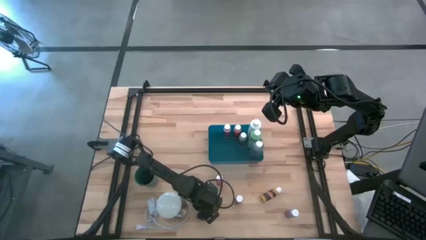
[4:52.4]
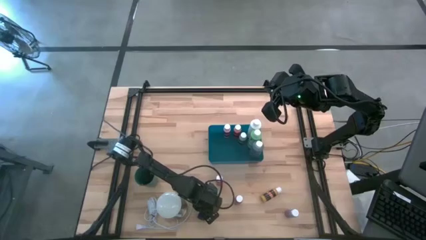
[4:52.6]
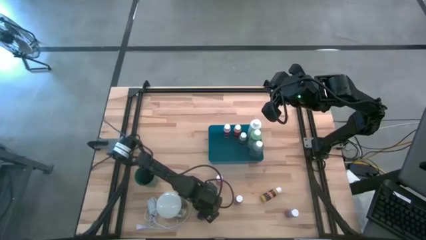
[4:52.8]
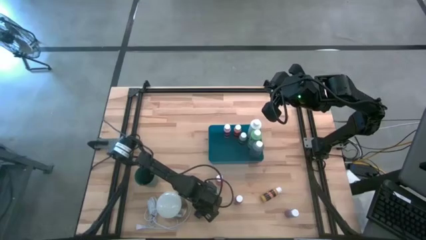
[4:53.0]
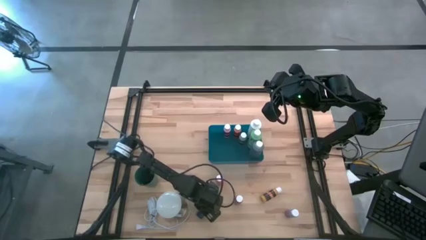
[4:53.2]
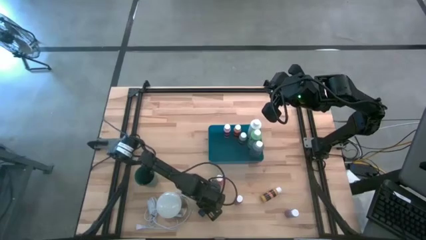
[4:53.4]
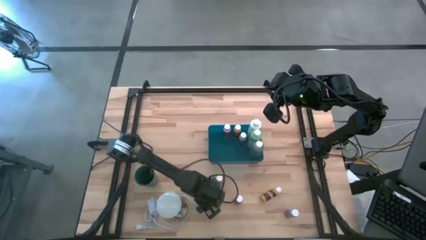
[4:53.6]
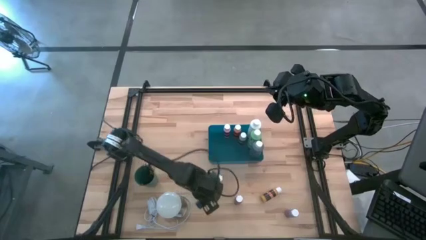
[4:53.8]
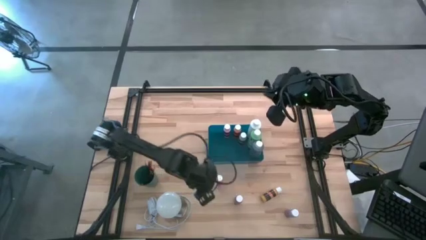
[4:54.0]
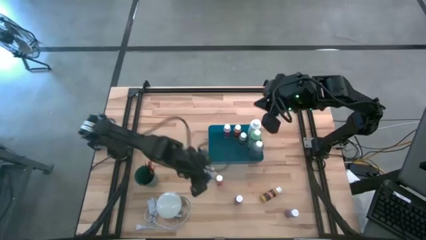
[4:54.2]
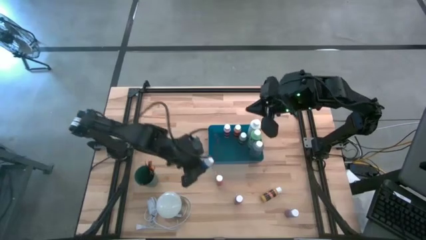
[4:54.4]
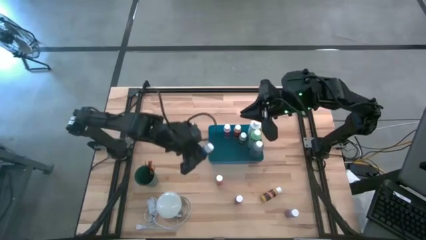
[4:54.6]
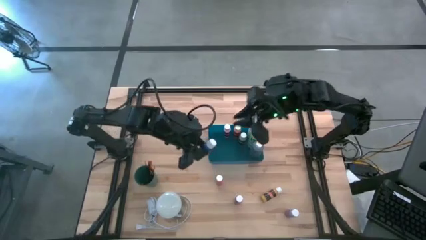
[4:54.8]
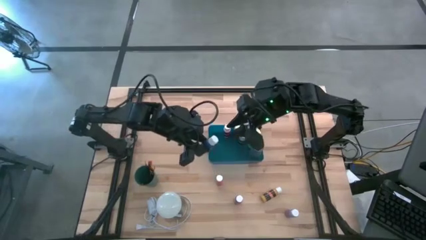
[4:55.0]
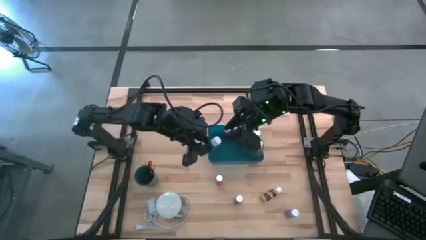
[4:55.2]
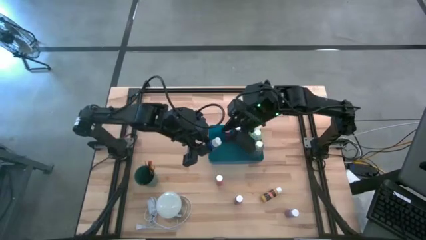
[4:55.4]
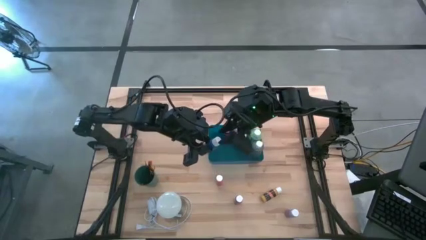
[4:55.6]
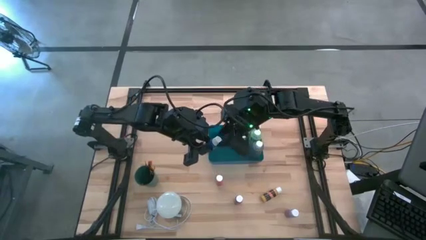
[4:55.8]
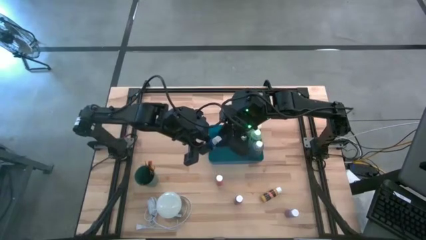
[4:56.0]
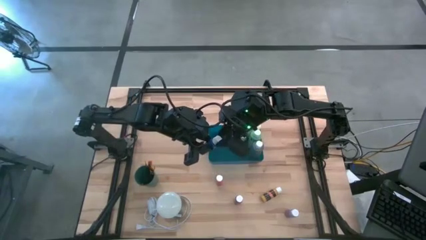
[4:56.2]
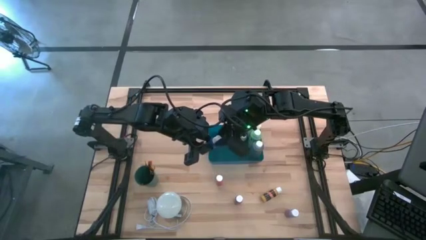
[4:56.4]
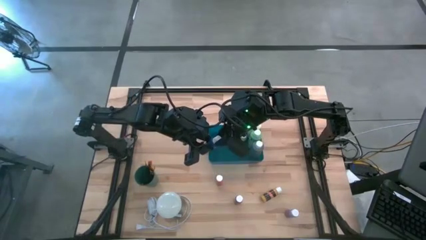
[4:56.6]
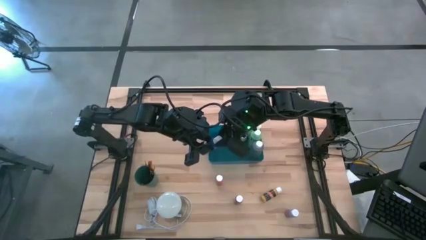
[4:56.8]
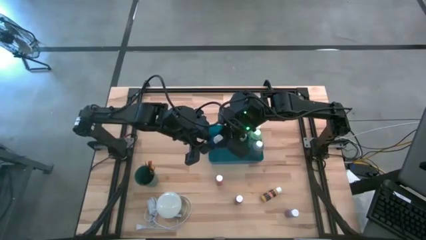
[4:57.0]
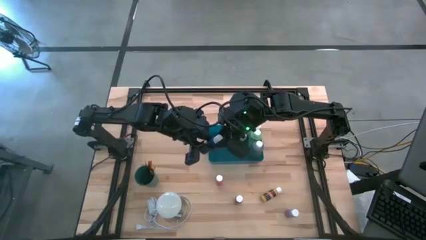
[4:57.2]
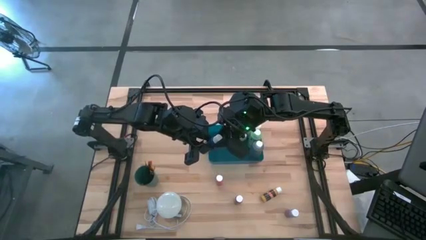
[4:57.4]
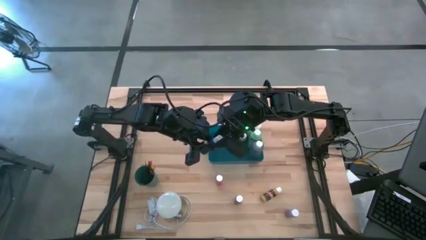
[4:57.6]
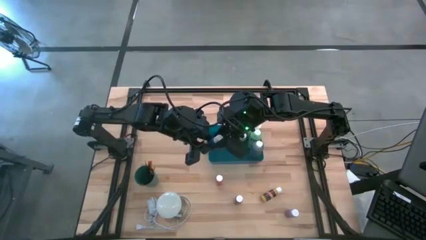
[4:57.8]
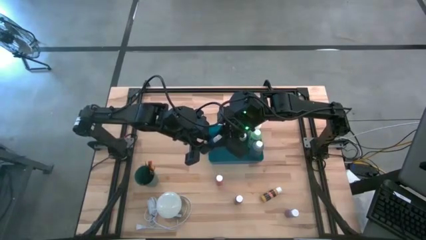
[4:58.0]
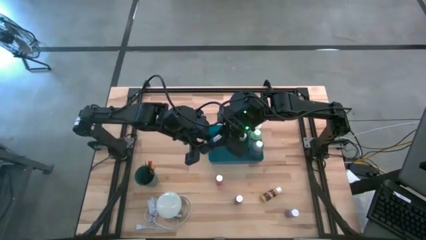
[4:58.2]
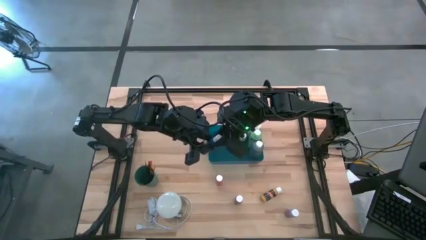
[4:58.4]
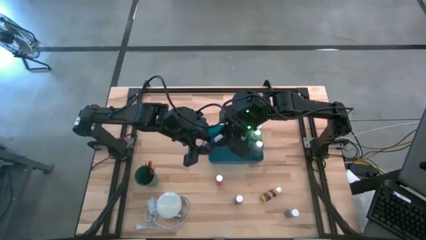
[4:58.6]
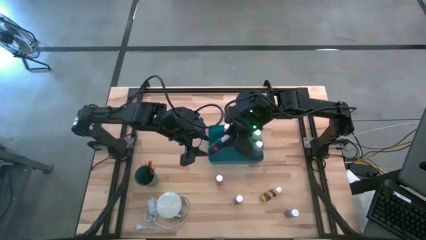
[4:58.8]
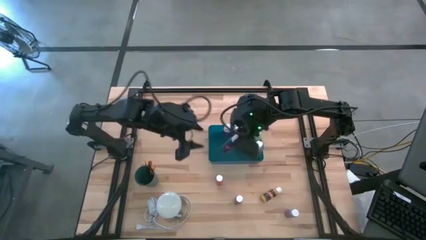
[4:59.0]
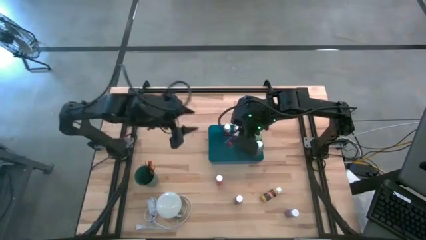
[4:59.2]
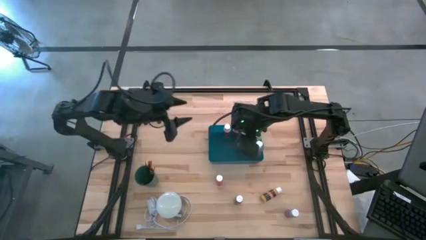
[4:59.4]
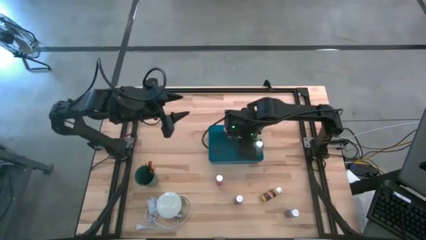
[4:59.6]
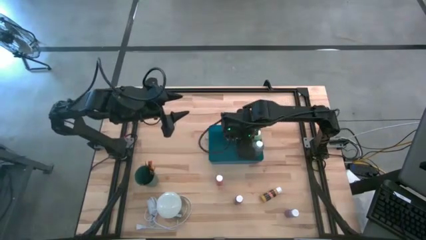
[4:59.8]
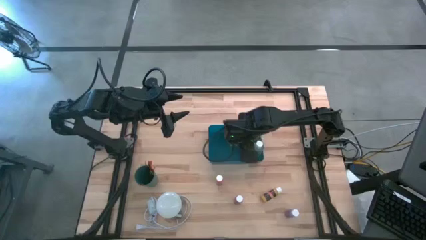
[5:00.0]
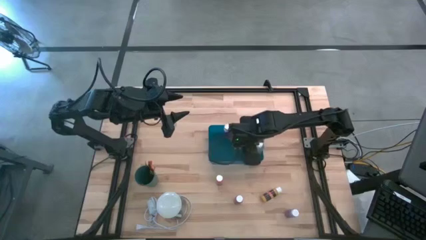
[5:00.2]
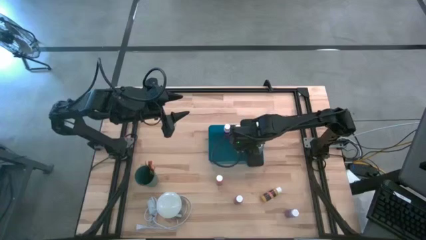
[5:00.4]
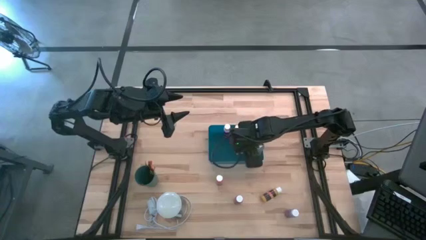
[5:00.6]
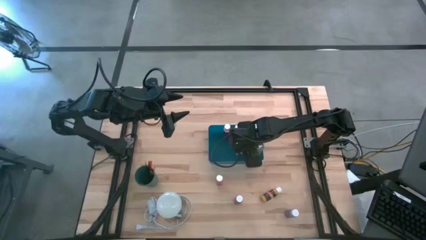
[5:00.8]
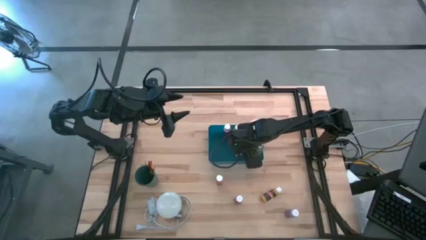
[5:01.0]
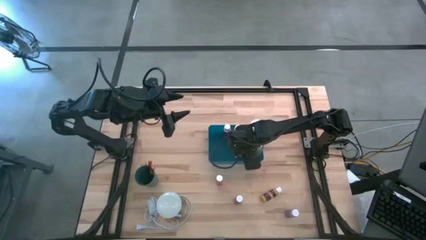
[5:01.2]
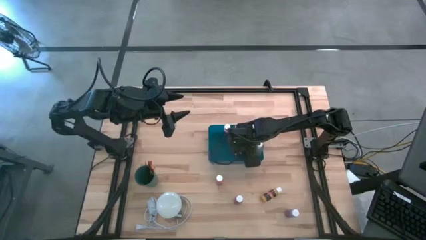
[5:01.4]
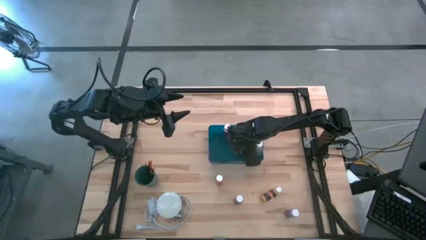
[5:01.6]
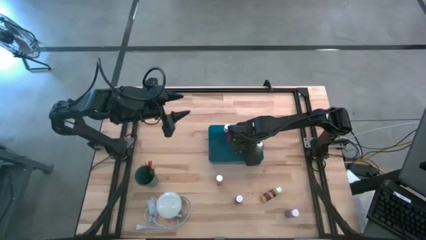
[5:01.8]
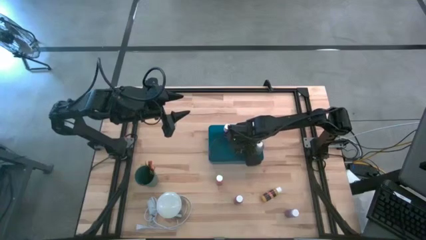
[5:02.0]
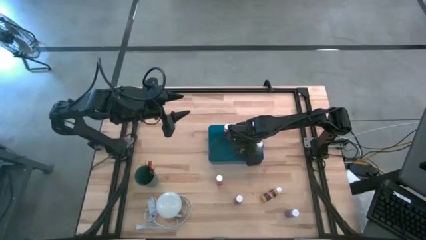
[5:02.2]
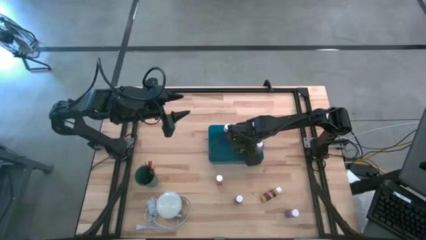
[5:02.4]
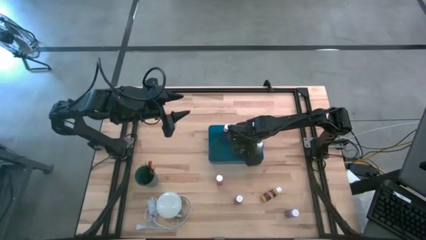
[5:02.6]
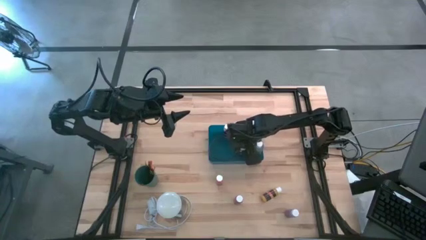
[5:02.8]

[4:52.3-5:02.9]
Task: Pick & Place Paint Supplies
Put the blue paint bottle into the blue bin

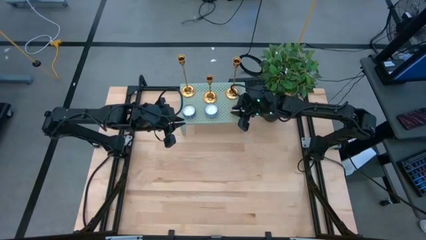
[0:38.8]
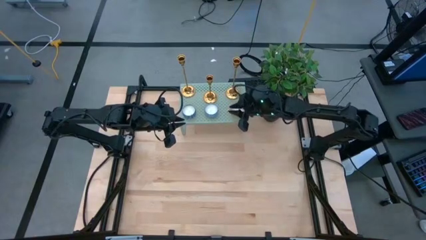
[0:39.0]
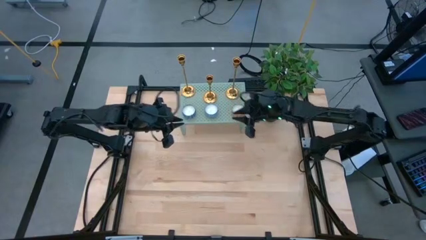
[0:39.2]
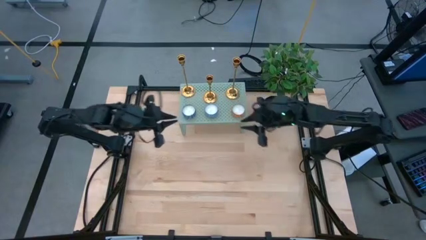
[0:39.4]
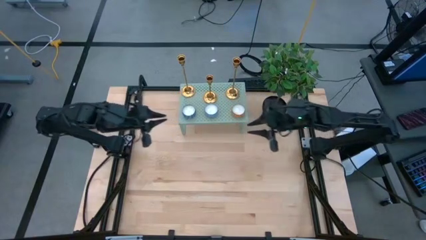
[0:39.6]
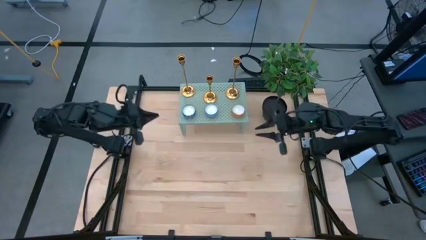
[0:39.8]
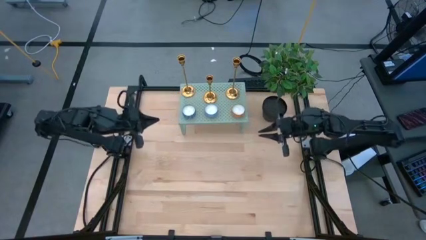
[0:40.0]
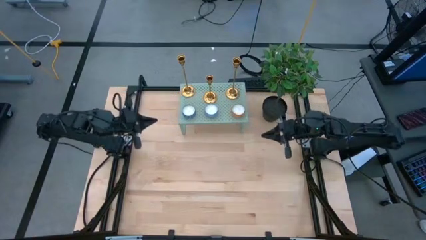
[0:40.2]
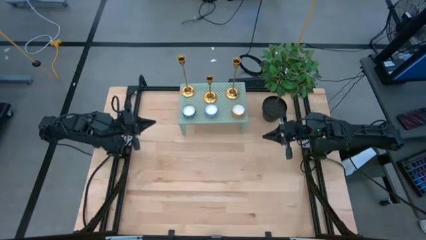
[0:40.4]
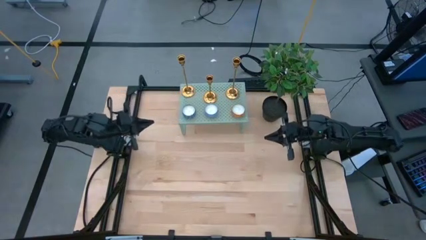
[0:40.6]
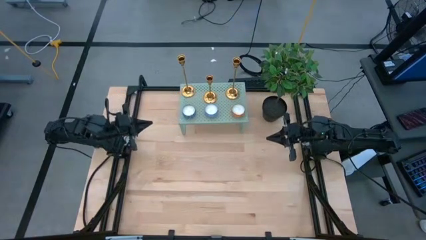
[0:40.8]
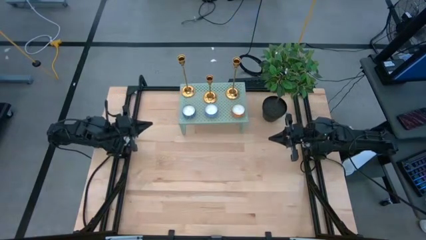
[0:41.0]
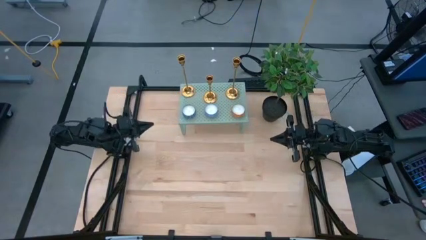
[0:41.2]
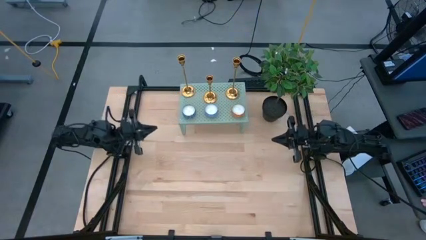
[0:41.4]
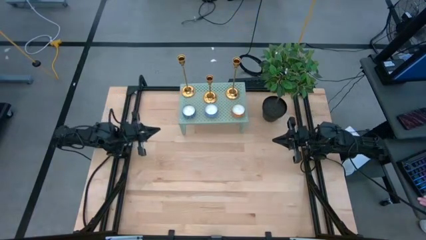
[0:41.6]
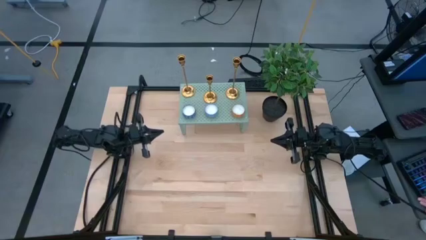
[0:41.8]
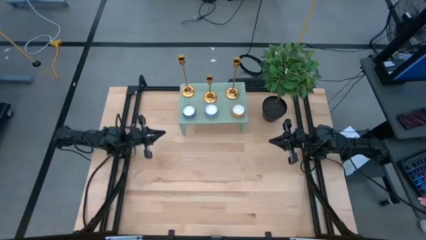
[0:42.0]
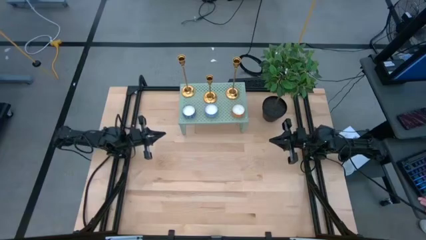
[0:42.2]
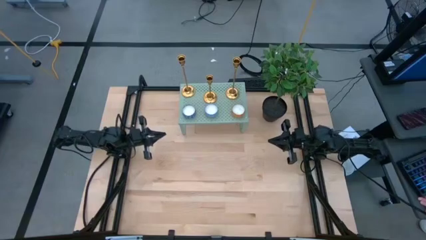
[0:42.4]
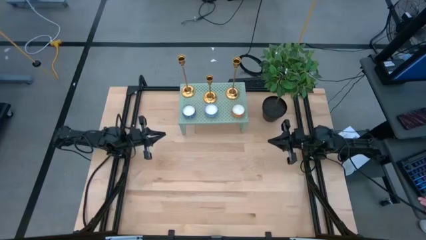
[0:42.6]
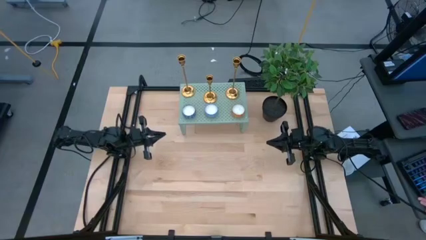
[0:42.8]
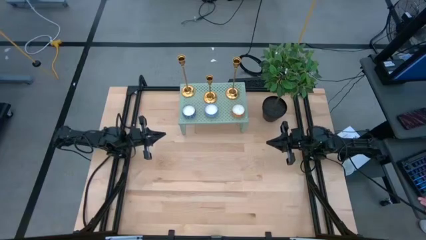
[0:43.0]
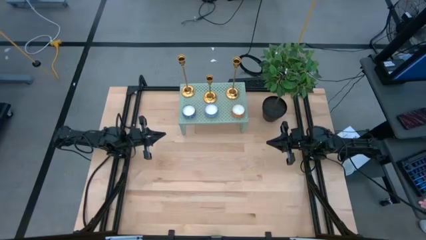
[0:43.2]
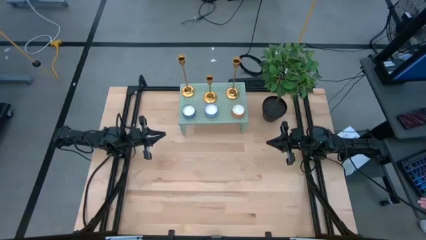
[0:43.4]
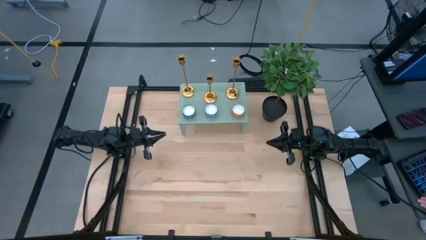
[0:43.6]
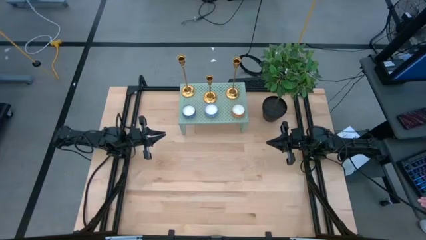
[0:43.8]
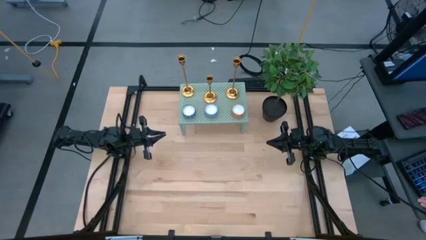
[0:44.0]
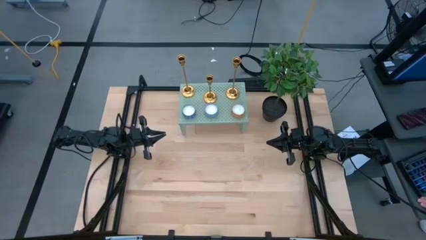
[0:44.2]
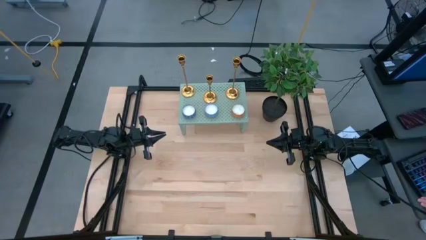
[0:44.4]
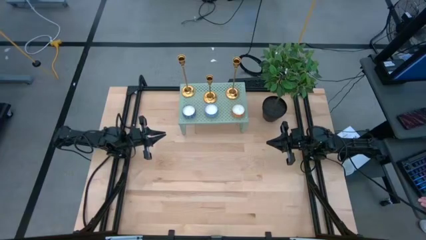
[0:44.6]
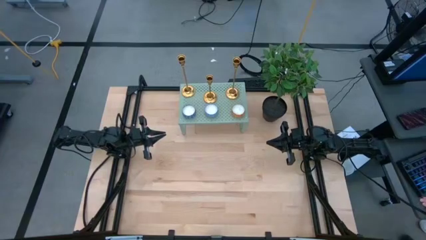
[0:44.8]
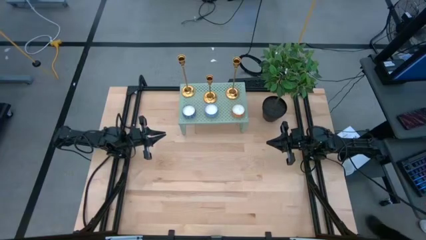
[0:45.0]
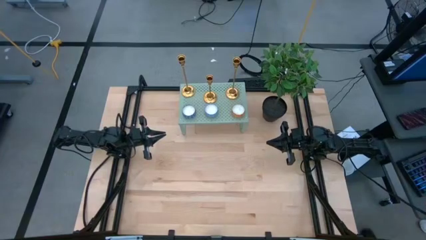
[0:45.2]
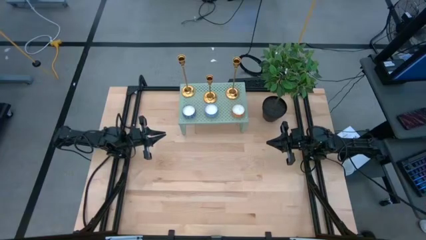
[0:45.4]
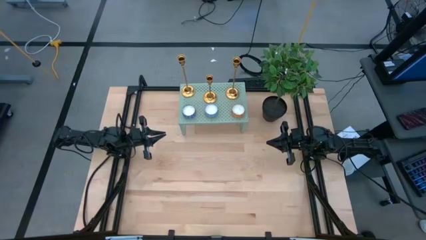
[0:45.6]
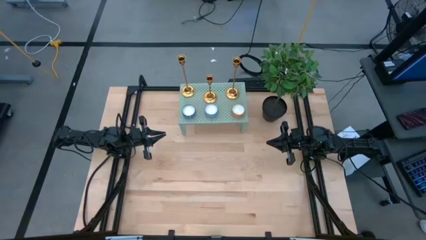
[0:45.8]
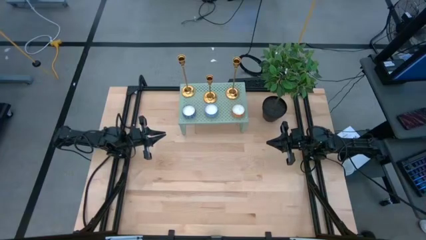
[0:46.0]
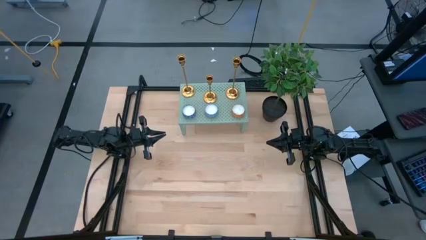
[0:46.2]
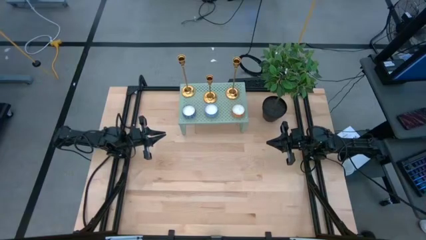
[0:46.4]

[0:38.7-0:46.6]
Task: Pick & Place candle stick holders
Return to Home Position
